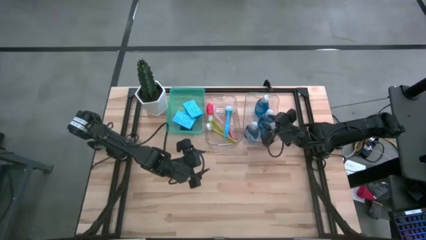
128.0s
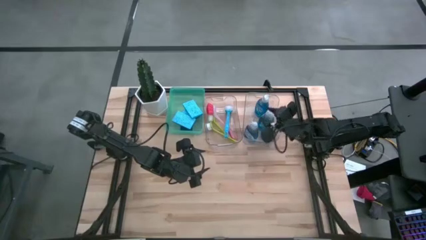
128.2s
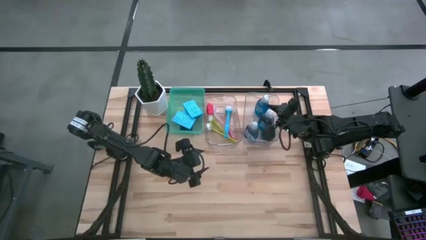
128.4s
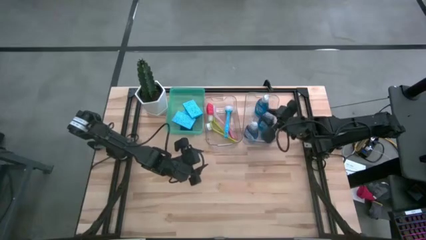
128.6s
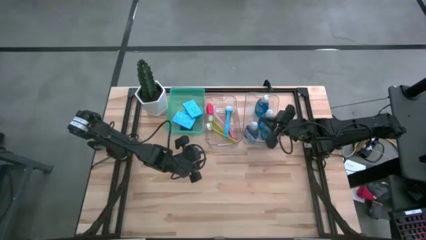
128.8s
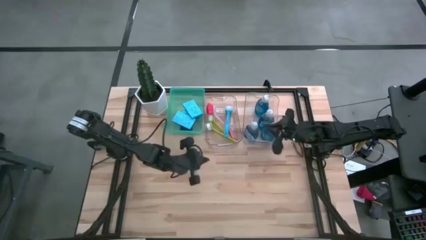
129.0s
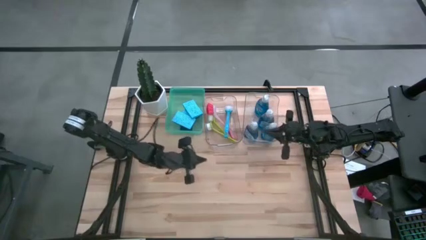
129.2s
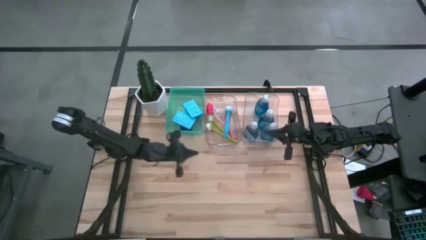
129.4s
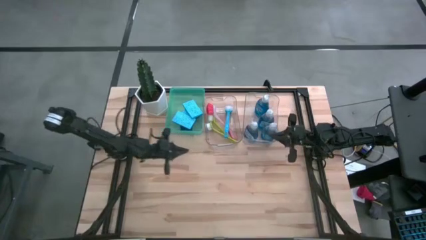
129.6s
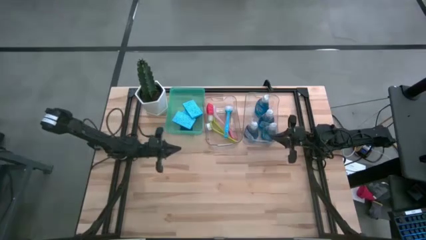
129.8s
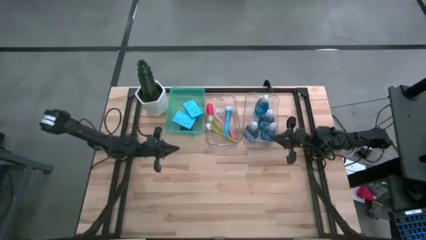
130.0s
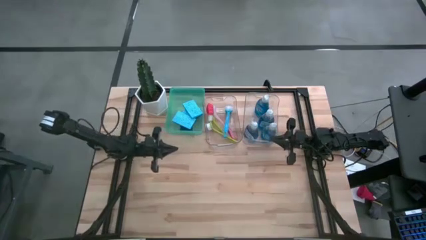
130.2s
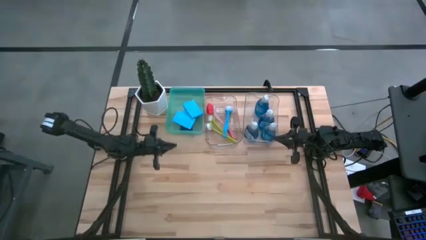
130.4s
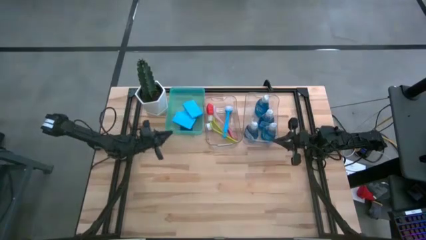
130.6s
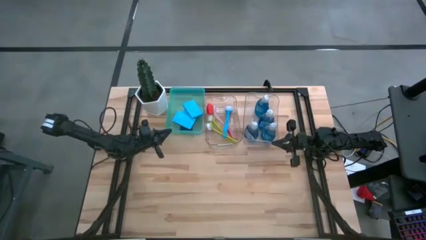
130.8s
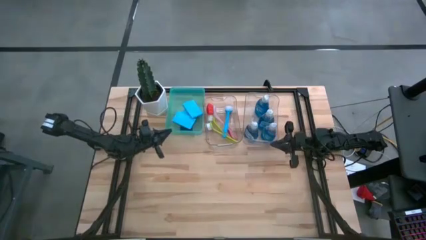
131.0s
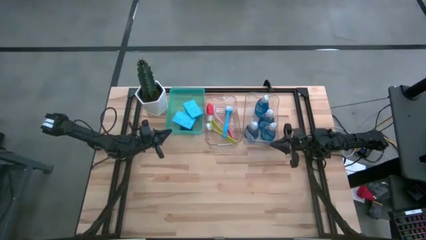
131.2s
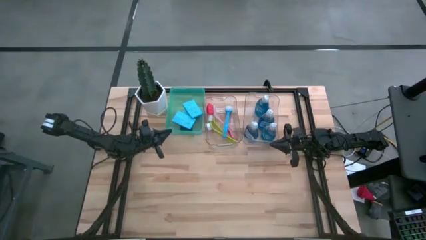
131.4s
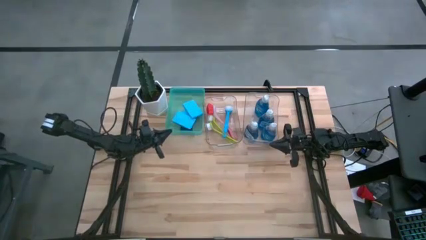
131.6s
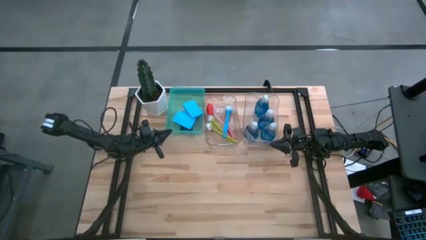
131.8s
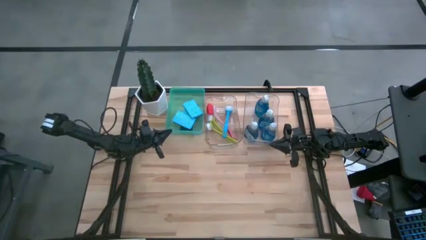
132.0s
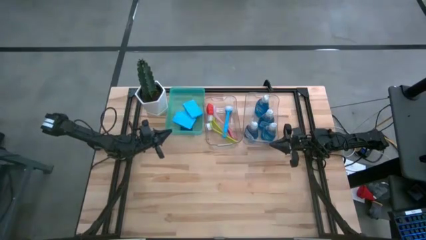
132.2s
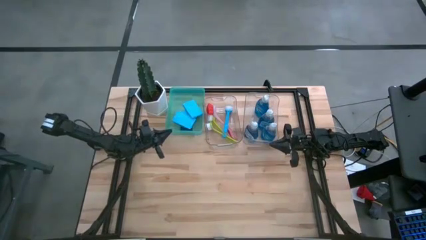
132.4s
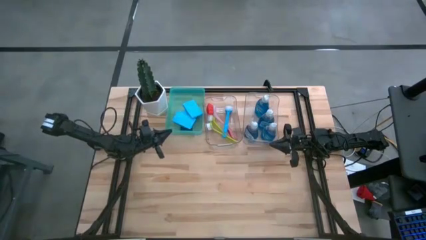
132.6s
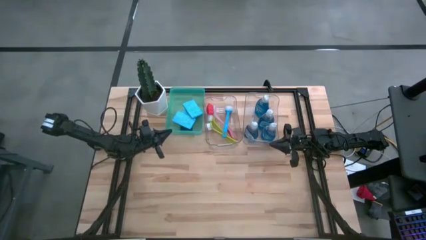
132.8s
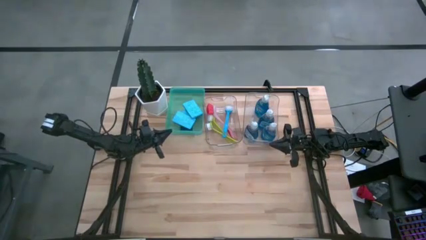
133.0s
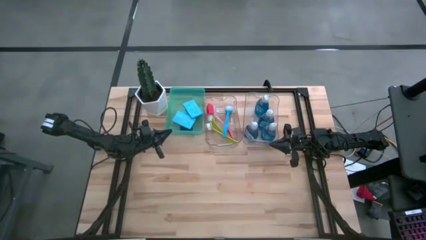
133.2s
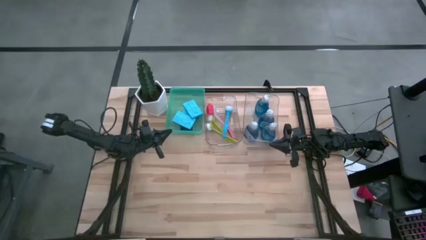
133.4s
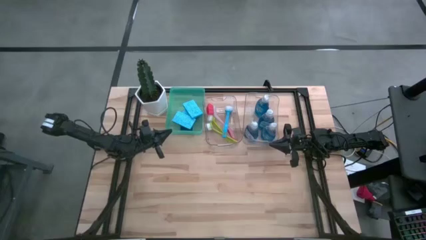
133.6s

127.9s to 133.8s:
Task: Pick & Place Kitchen Sink Supplies
Return to Home Position

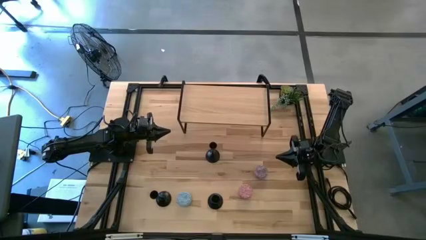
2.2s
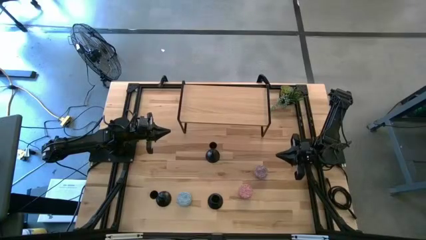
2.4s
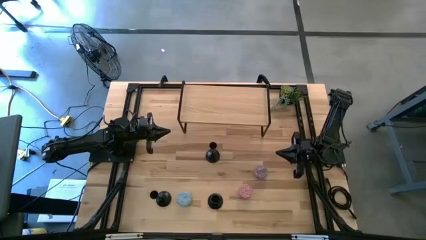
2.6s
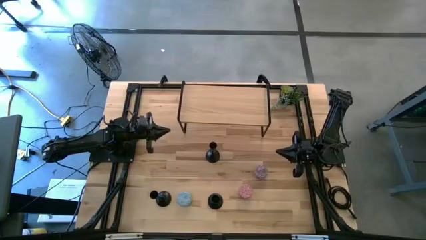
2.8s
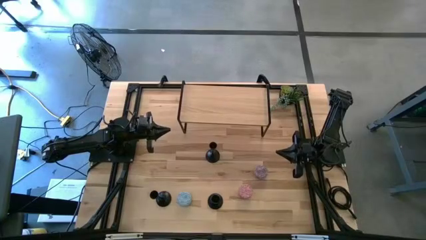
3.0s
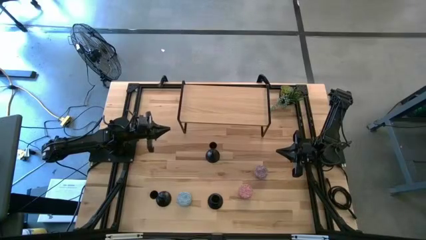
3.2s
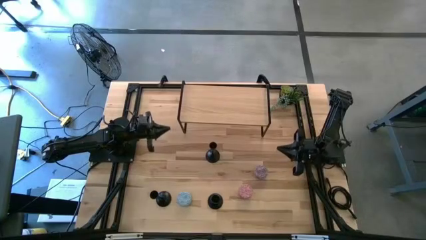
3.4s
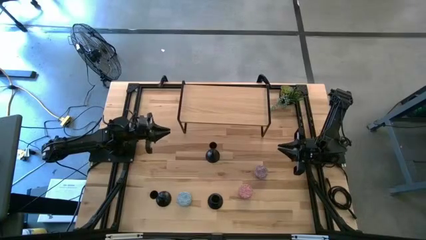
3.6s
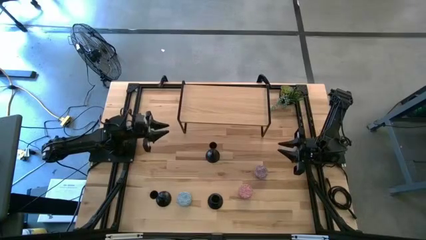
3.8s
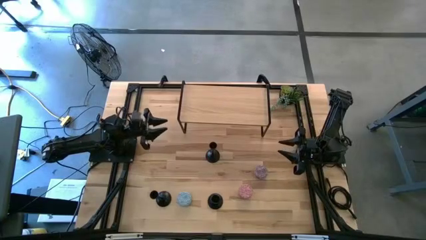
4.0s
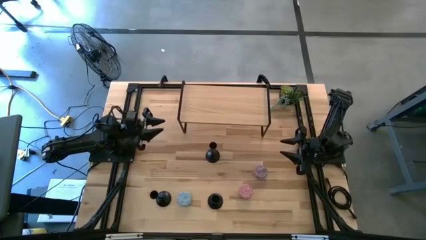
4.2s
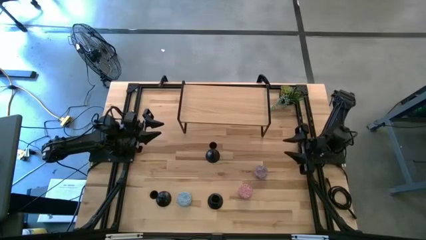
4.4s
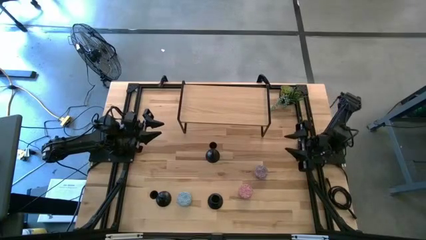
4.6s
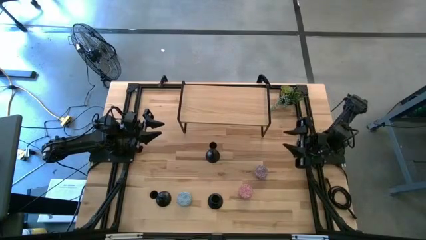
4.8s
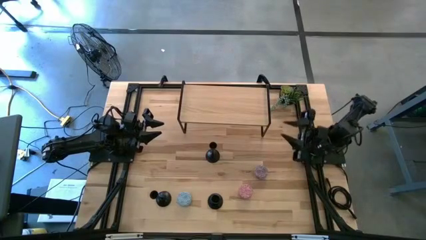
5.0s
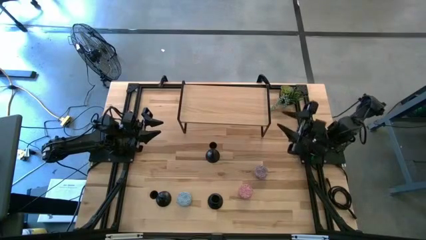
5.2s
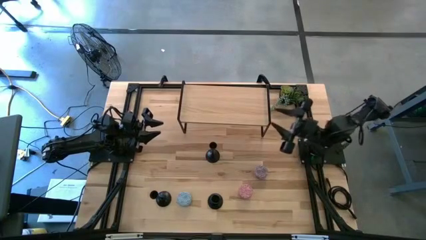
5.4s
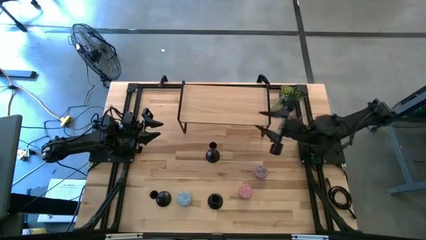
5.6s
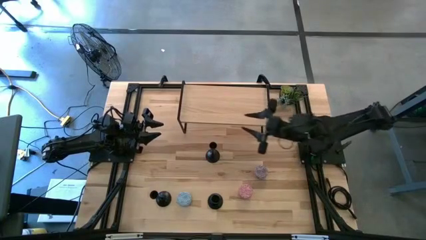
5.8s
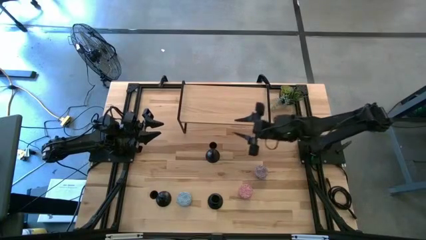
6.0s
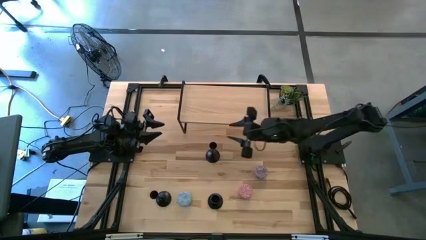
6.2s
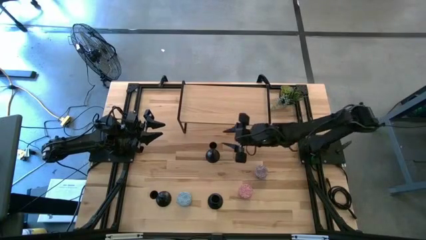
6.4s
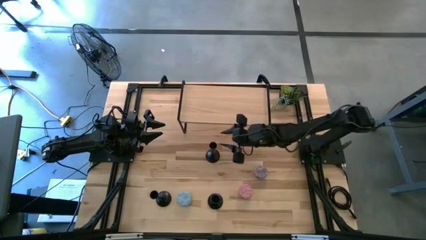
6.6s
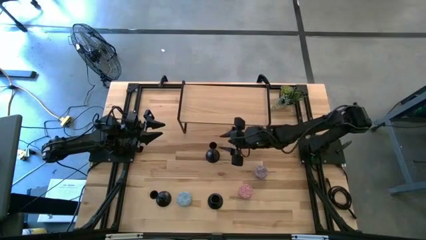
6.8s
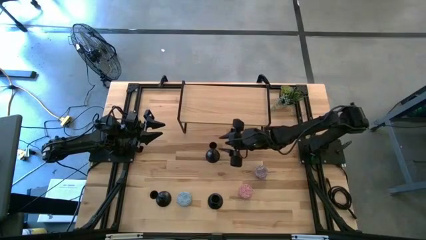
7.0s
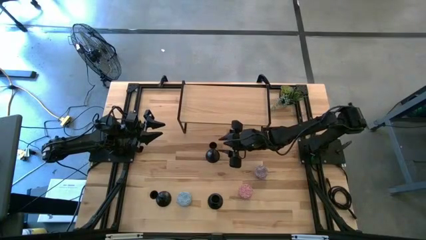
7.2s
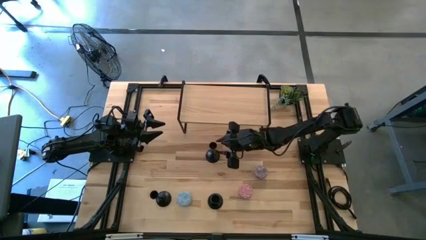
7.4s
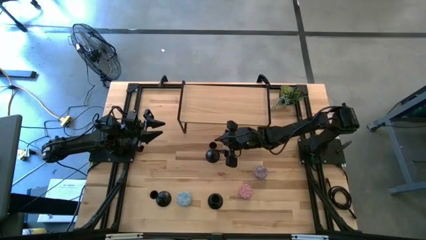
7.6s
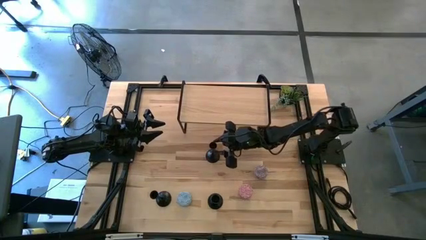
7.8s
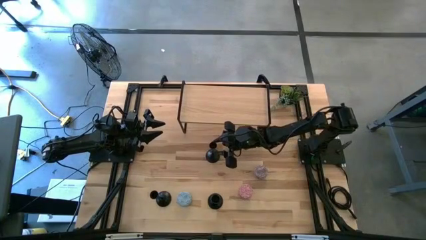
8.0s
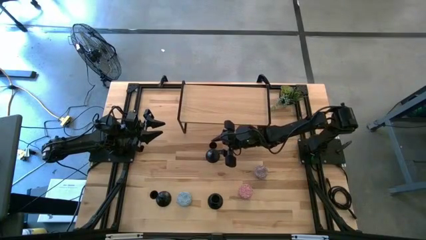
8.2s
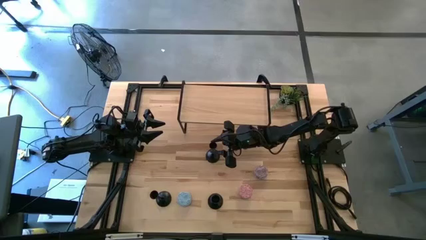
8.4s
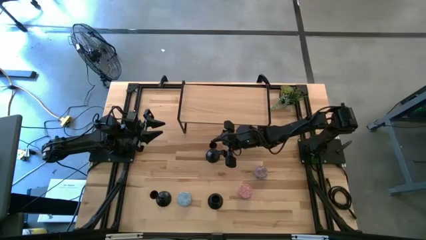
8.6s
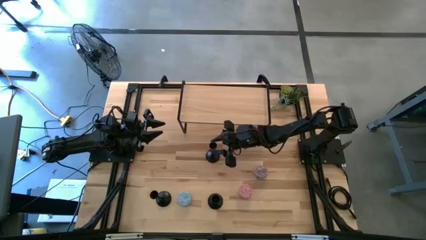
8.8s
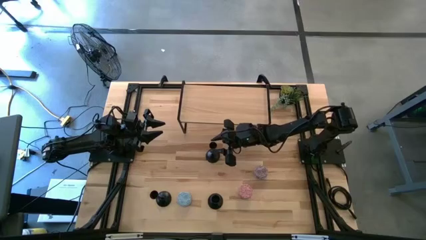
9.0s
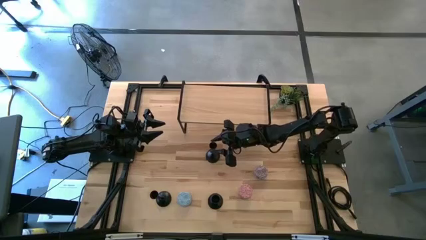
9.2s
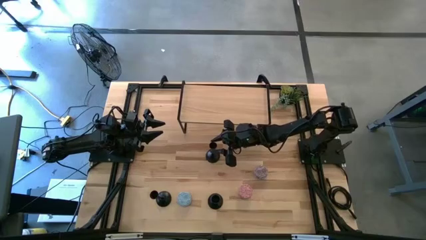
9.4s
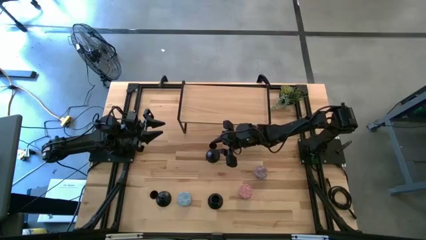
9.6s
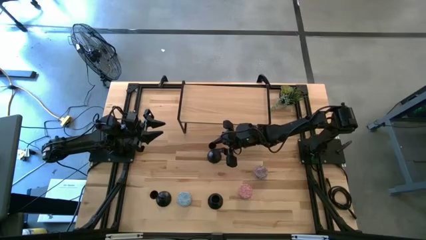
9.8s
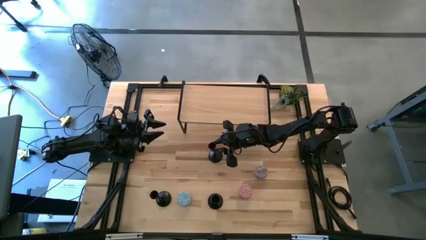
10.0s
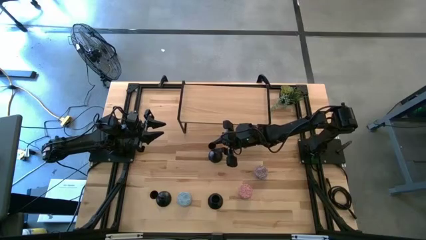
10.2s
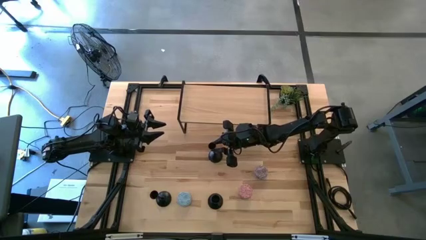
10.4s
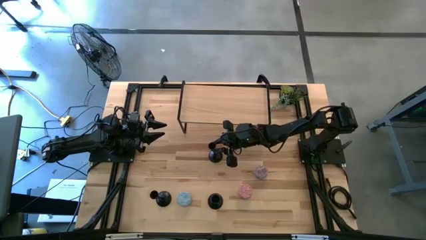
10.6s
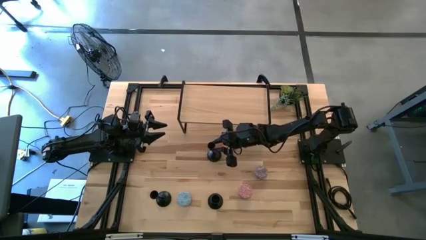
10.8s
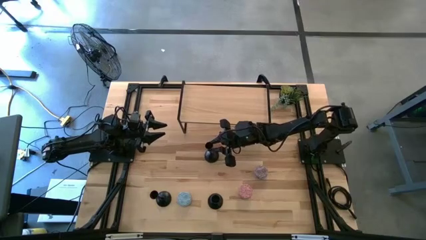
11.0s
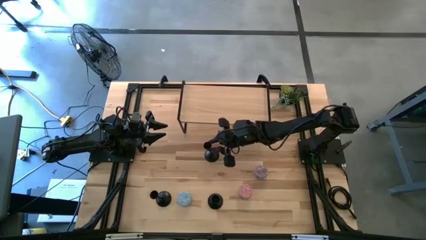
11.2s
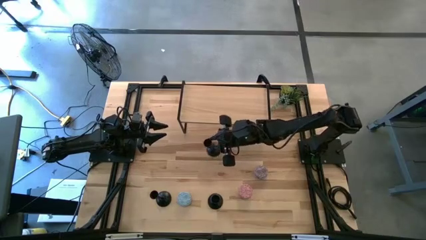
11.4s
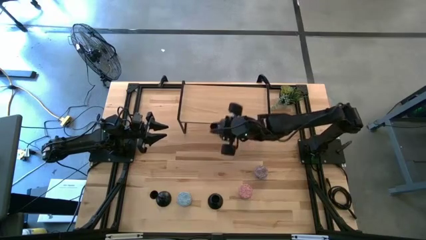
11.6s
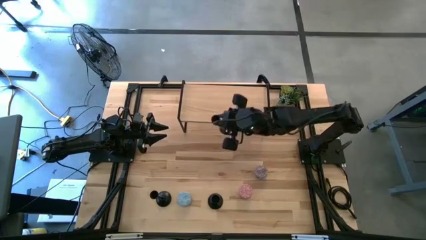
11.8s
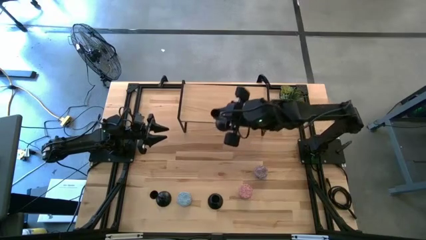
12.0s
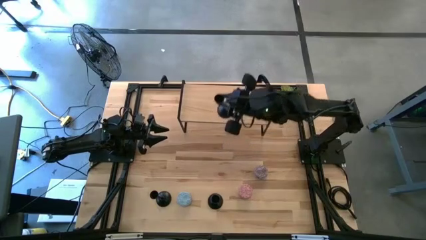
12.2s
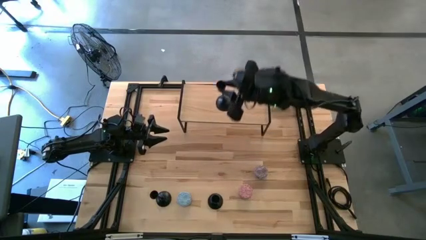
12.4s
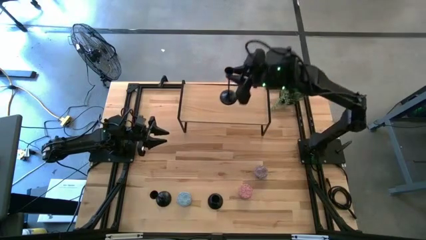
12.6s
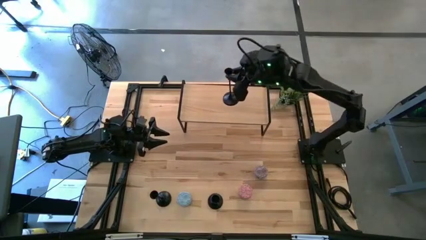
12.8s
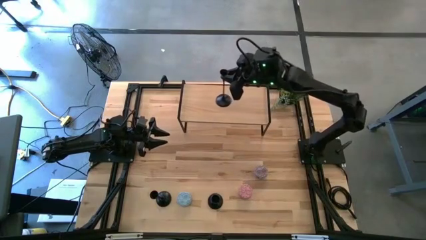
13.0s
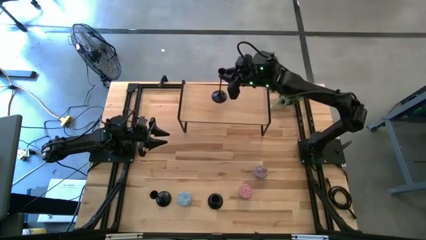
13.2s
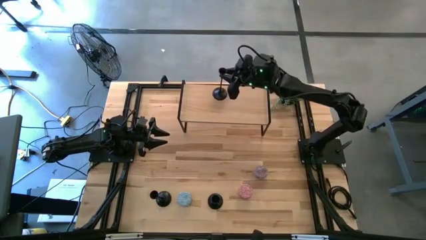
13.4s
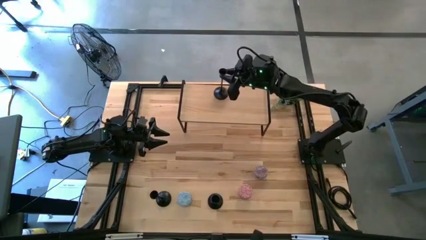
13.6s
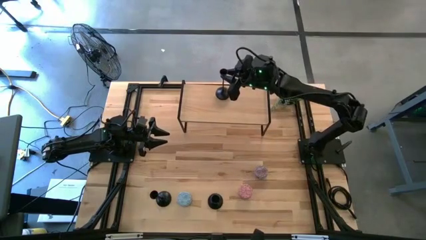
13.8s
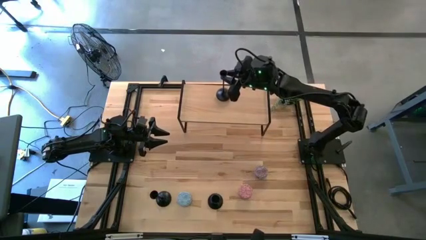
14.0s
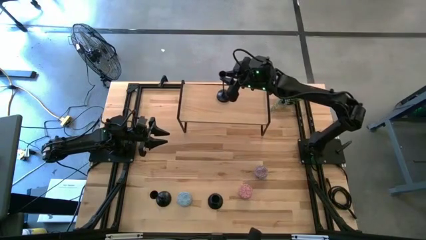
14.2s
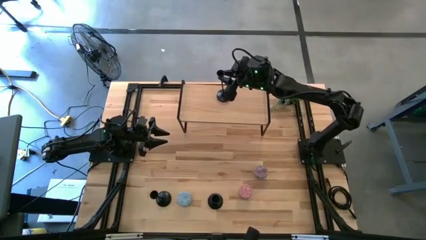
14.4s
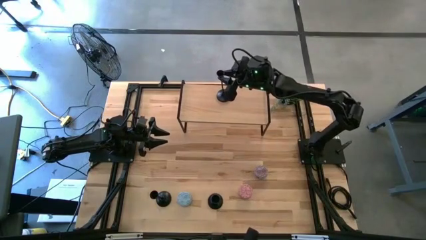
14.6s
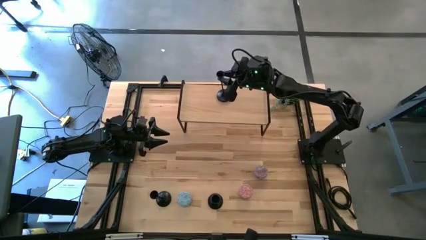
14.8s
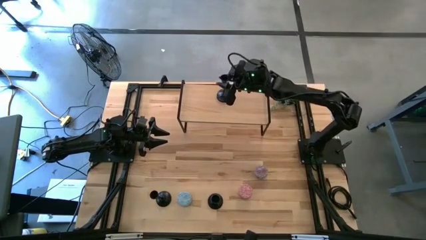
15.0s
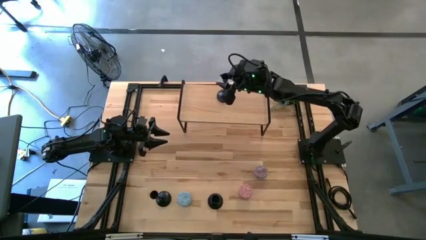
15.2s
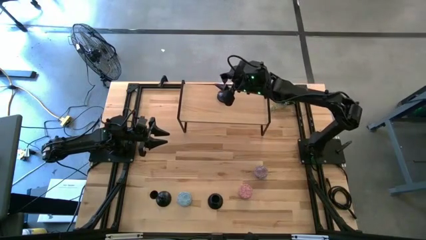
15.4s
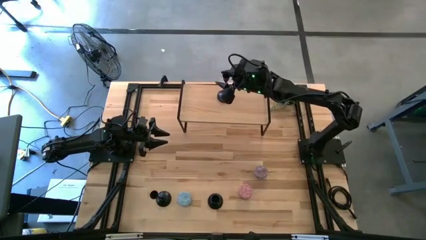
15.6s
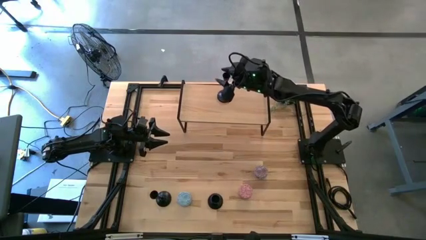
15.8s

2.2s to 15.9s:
Task: Pick & Place candle stick holders
Put the top black candle holder on the shelf
